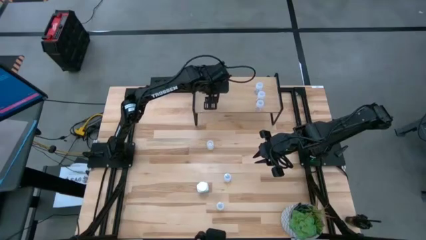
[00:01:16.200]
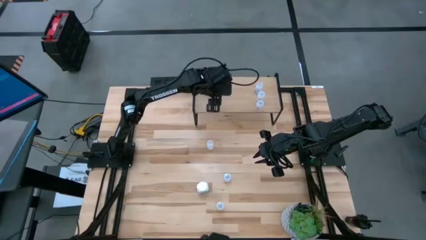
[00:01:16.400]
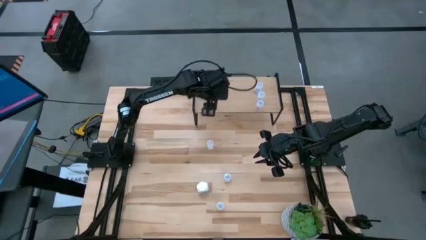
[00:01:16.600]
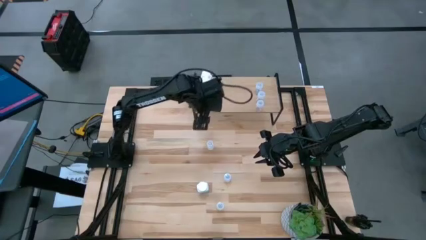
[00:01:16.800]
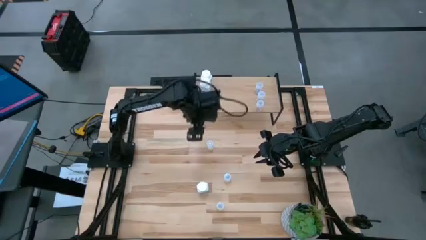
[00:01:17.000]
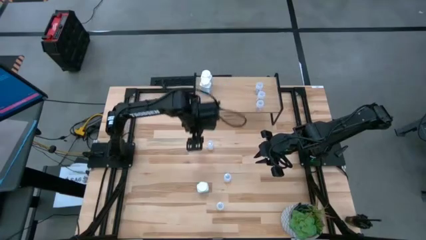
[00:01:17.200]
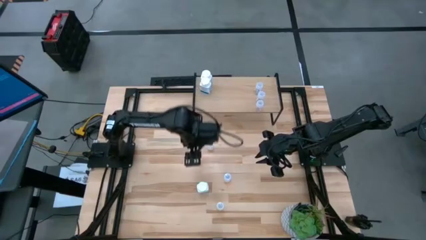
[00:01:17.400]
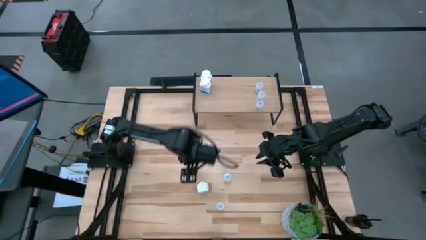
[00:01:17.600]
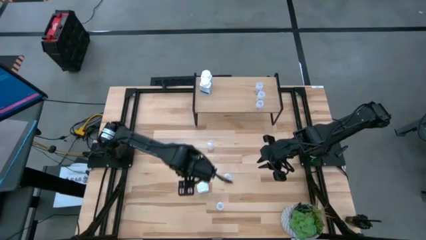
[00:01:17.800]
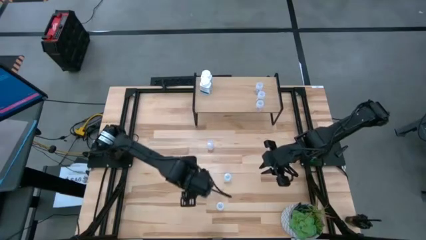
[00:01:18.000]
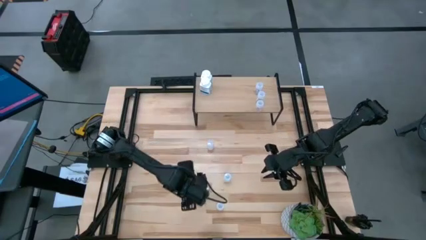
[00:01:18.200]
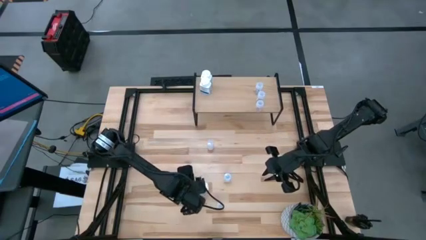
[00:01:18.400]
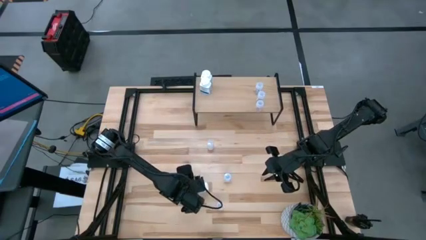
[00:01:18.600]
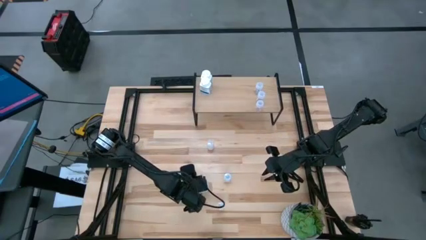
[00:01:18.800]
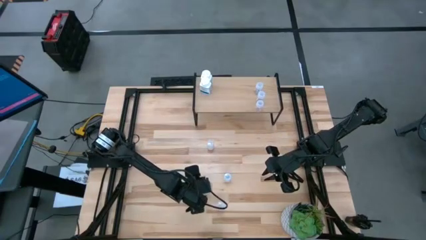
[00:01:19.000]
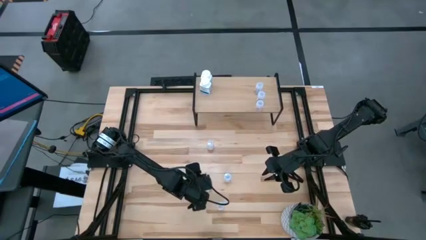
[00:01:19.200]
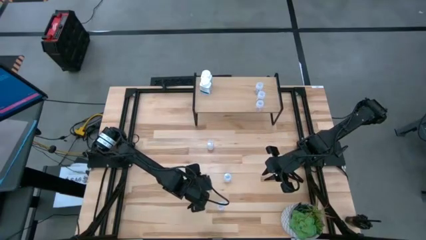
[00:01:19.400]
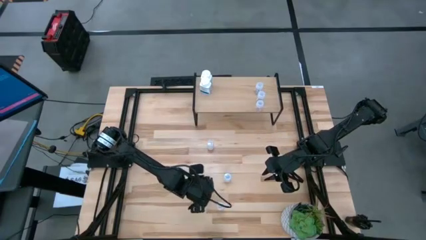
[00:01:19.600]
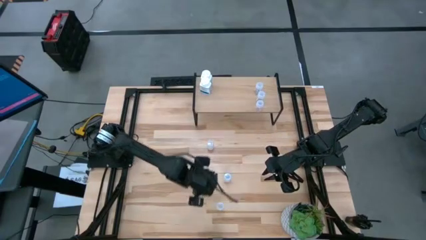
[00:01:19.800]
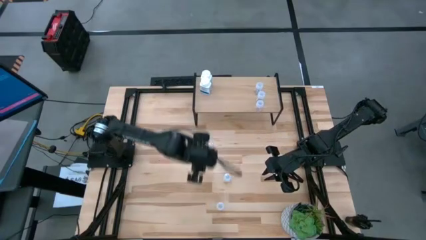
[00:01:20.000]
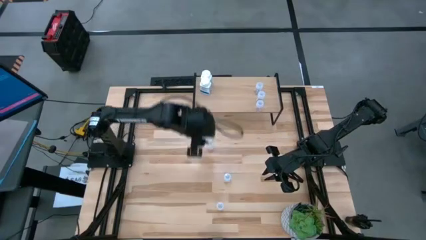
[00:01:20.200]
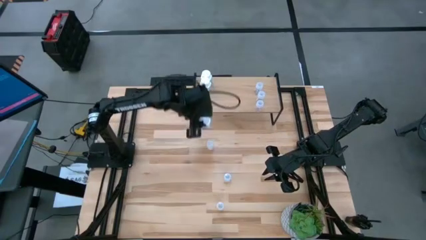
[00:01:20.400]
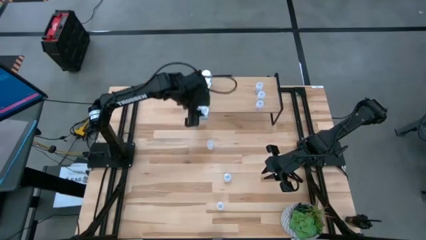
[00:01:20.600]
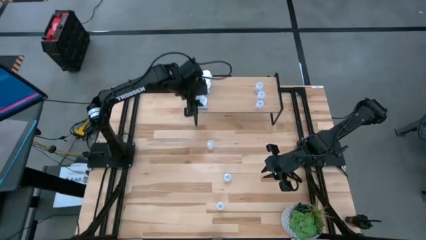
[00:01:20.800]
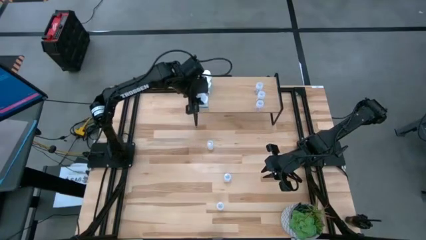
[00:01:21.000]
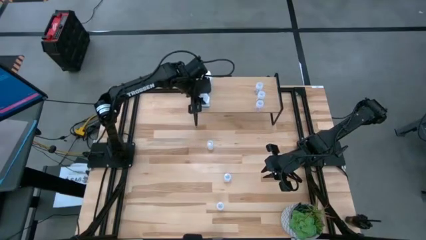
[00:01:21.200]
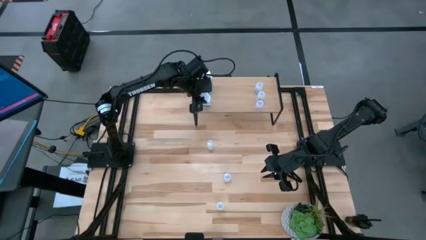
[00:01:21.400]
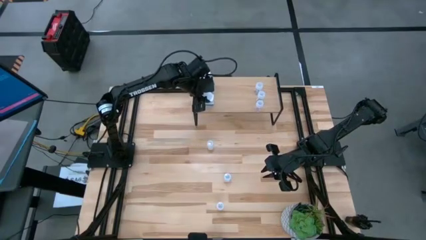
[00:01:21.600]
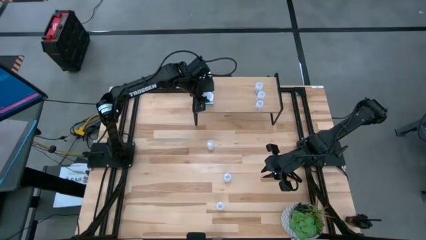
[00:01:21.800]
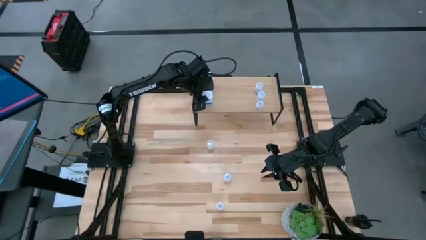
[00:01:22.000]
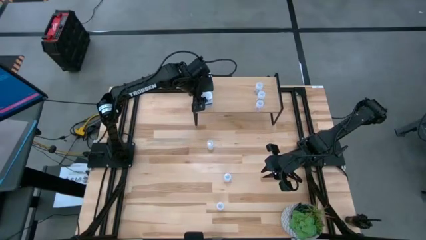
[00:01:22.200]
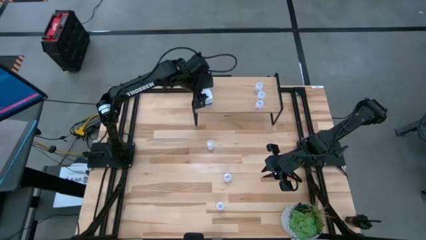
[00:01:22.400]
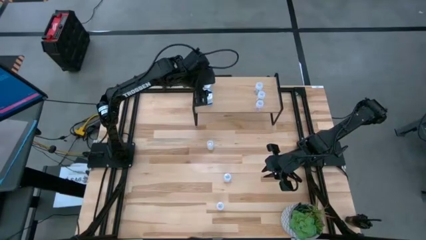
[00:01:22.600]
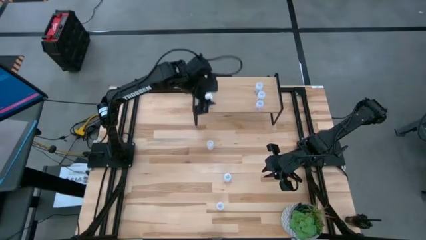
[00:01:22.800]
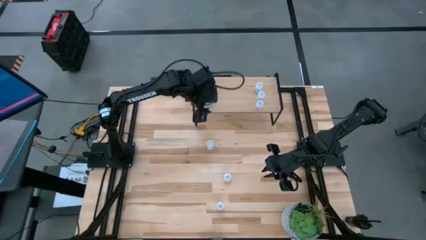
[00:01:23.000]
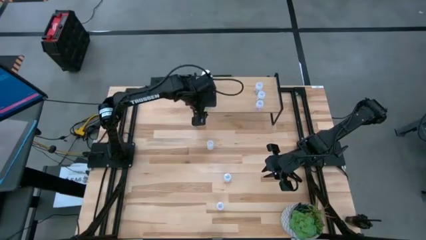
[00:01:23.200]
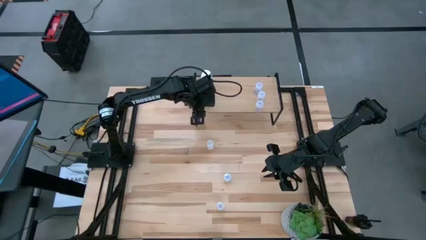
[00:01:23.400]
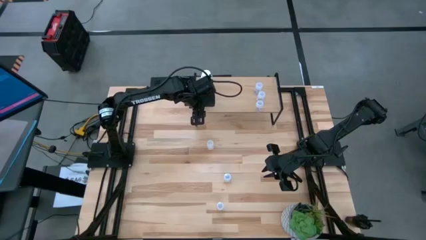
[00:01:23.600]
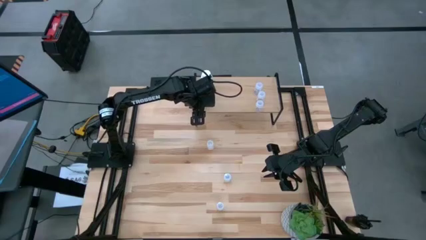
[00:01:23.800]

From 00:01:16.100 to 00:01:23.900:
Task: Pick and place medicine bottles onto shelf by color
Put the white blue pill bottle on the shelf aligned with the other white blue pill bottles

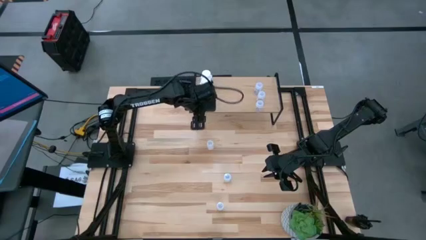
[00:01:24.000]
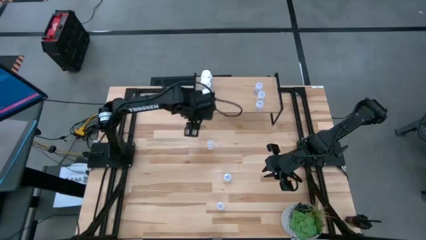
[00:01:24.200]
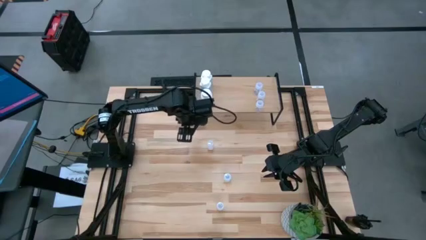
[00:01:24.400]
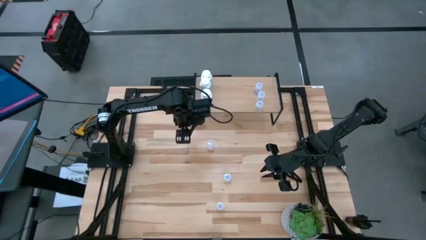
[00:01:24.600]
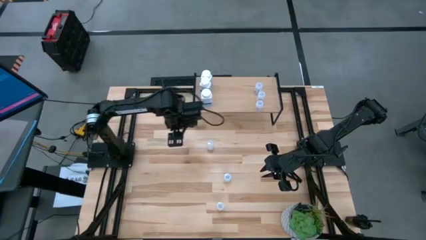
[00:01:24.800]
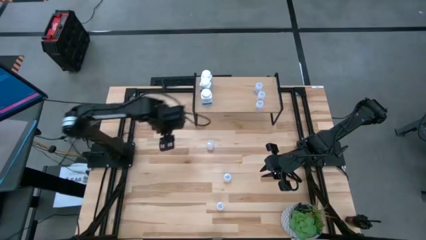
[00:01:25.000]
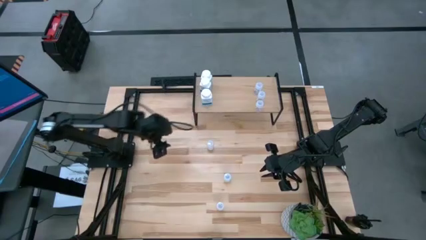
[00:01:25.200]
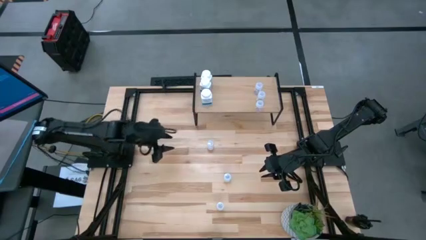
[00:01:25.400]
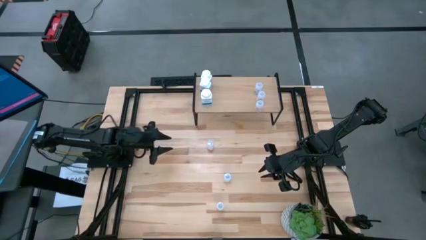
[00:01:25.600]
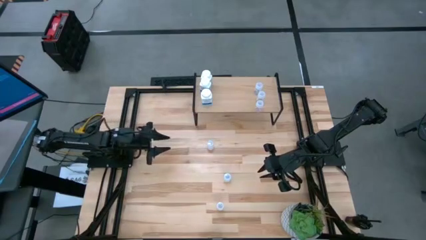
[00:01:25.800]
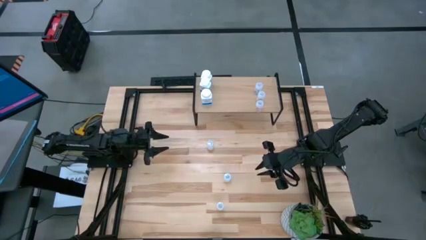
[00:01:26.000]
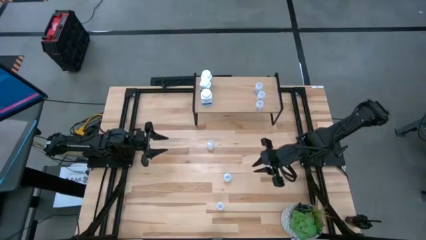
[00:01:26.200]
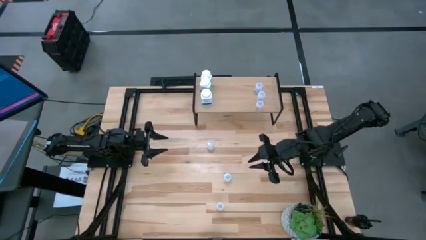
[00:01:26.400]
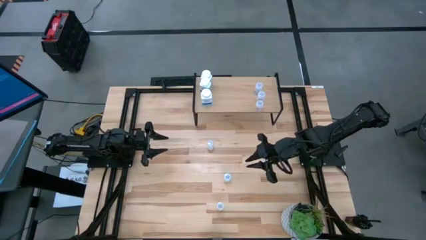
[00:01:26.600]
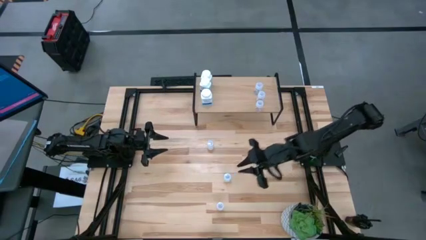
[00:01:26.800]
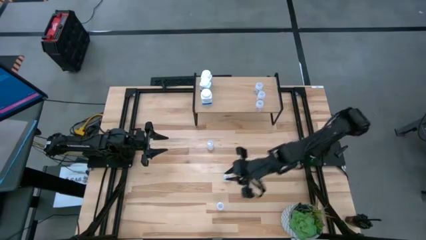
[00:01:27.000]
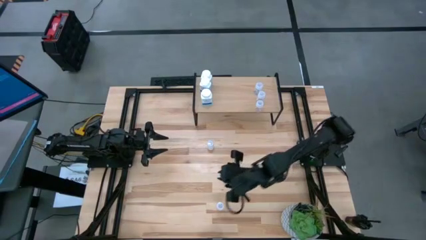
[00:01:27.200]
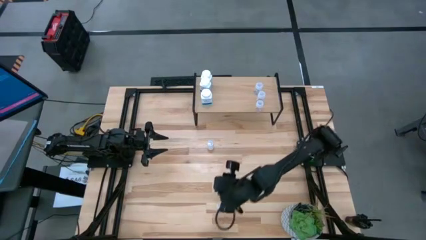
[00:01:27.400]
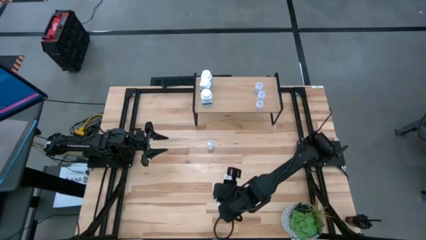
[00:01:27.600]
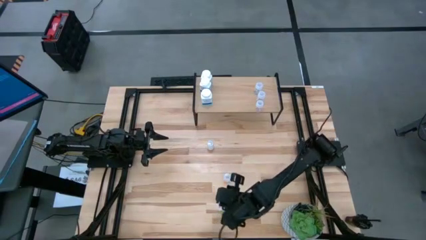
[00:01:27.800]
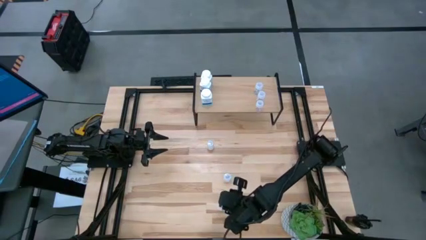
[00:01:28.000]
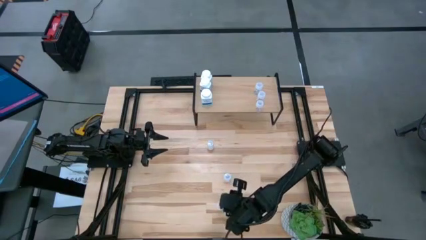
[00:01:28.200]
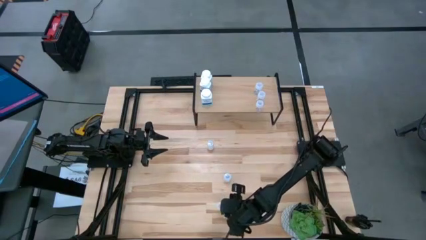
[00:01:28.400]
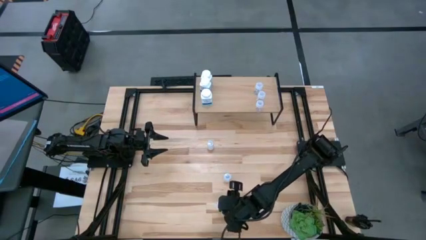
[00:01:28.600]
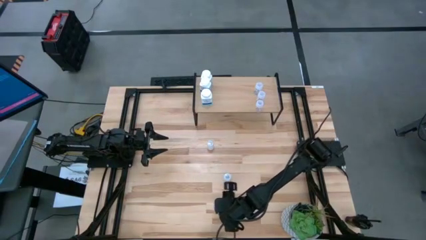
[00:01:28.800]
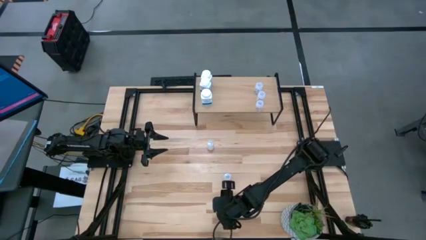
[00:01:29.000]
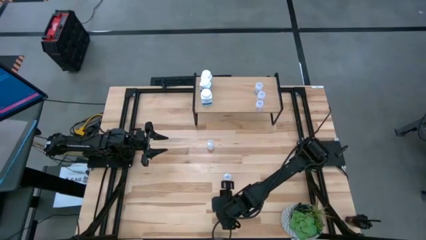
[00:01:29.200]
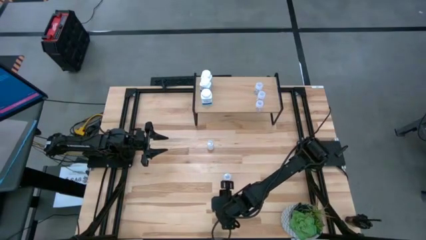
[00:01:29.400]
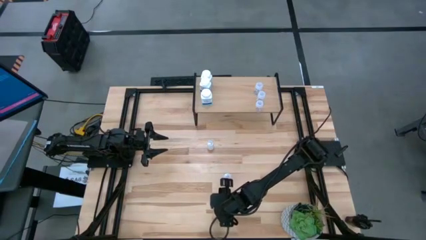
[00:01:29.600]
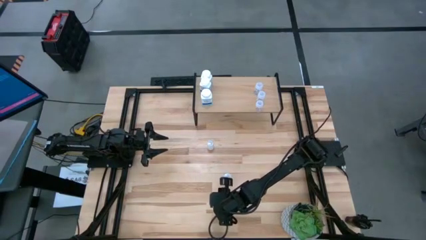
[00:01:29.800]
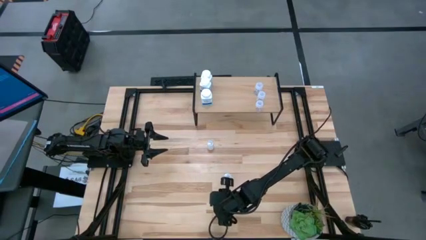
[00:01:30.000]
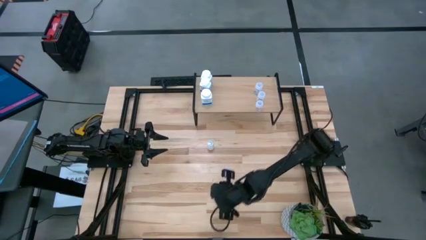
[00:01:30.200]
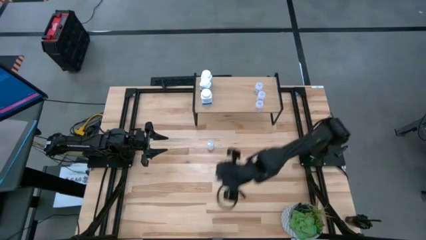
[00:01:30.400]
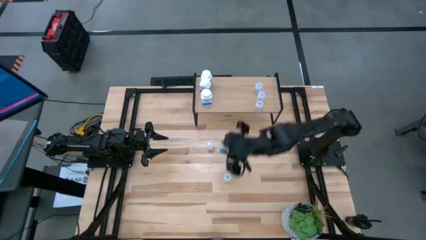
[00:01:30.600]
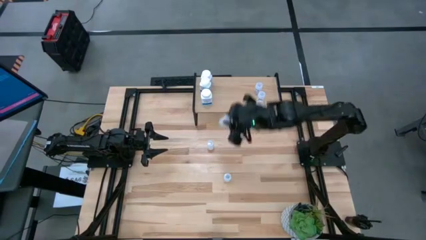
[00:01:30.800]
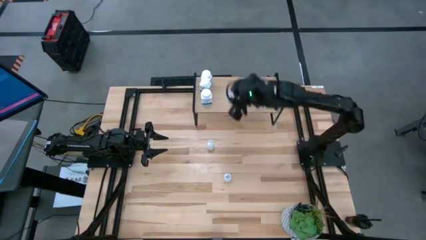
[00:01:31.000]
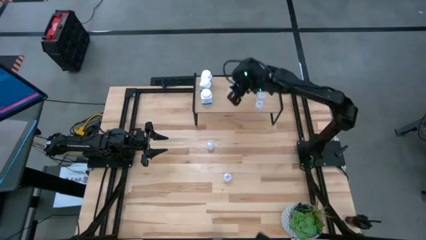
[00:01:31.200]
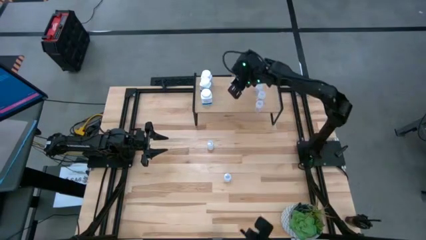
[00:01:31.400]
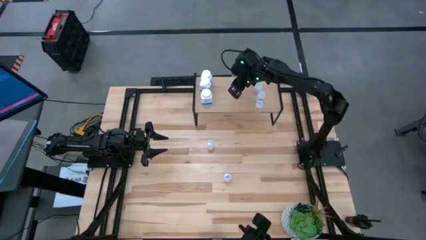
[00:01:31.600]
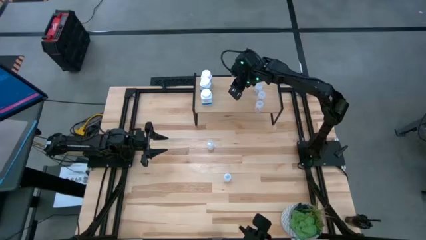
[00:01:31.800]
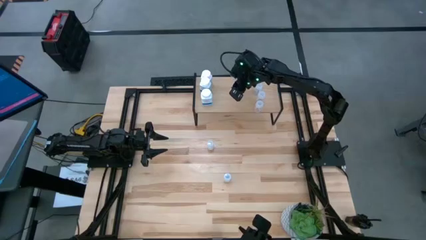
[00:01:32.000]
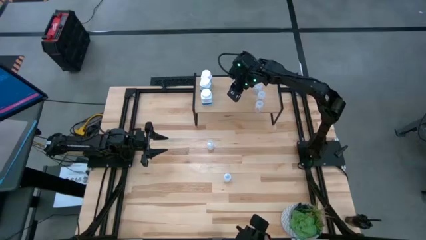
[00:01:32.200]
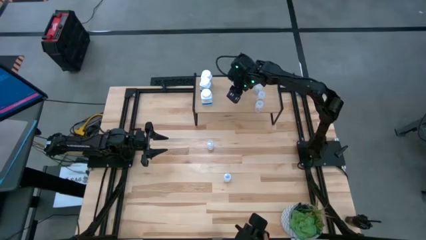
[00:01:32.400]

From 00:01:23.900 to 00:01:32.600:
Put the bottom white pill bottle on the shelf
